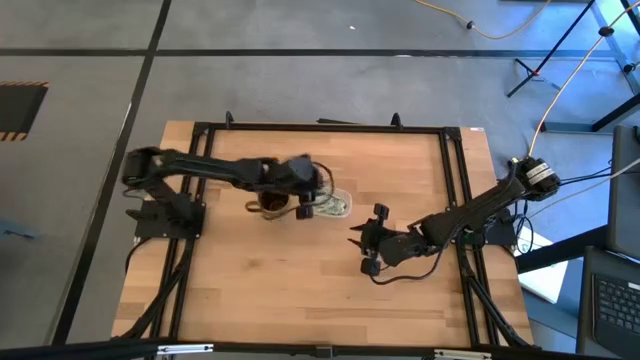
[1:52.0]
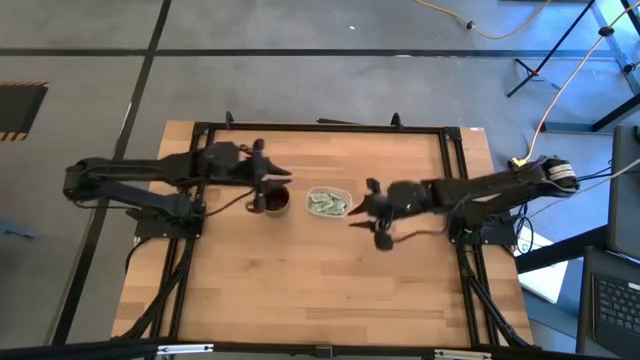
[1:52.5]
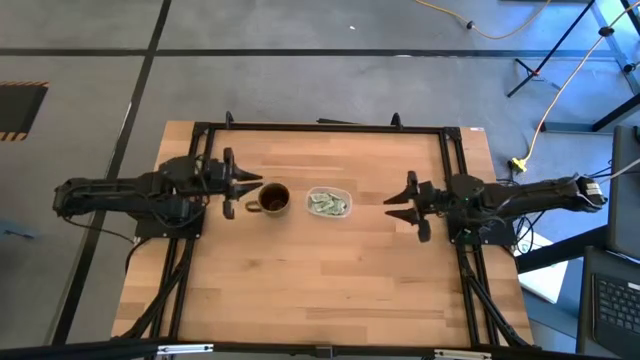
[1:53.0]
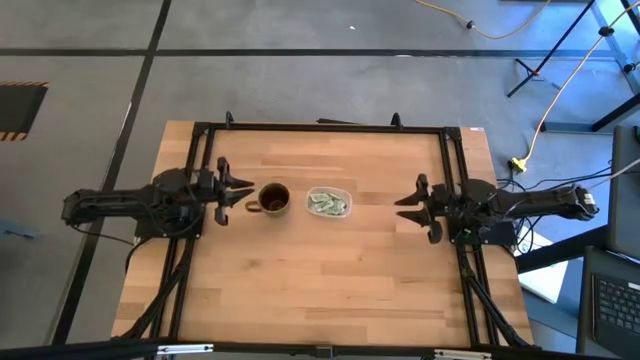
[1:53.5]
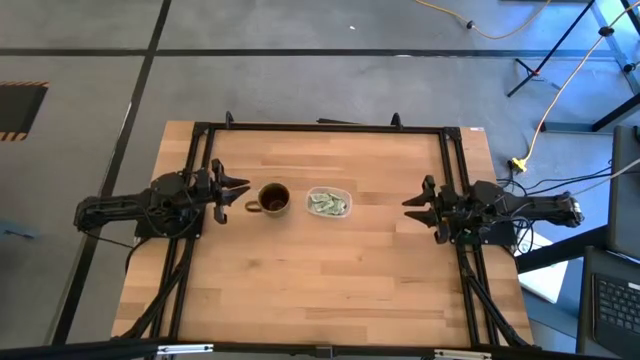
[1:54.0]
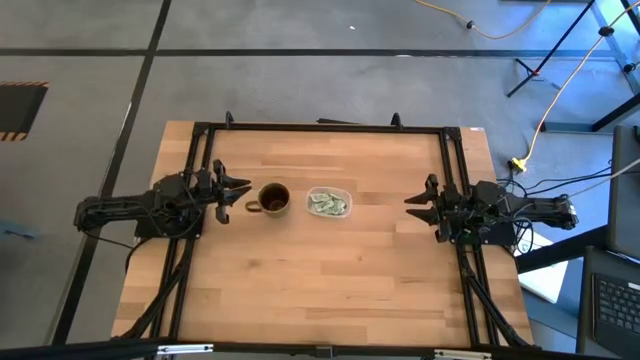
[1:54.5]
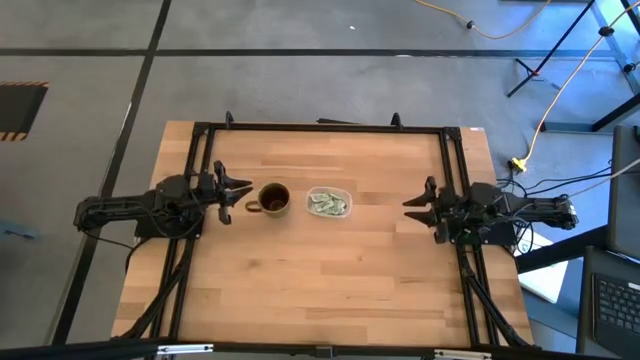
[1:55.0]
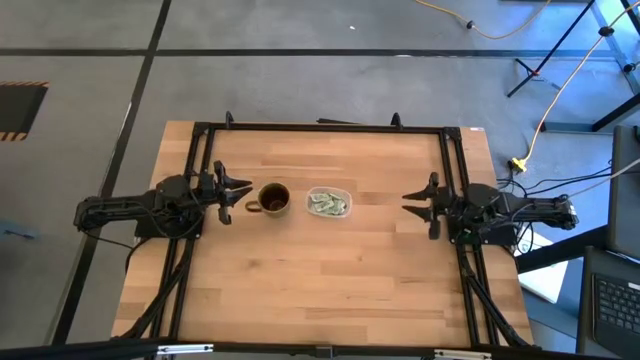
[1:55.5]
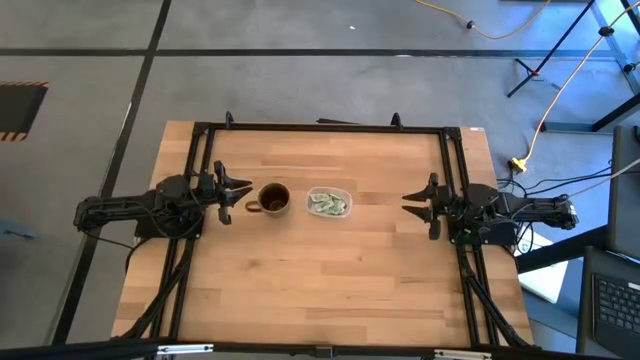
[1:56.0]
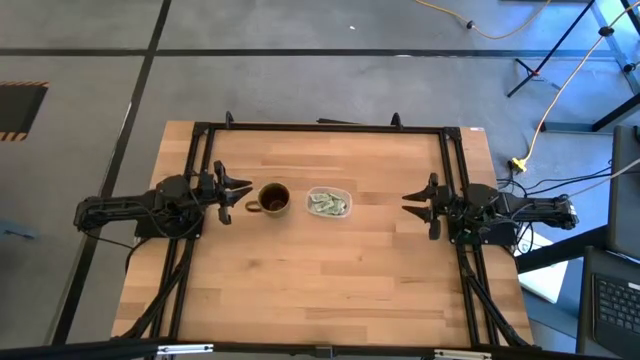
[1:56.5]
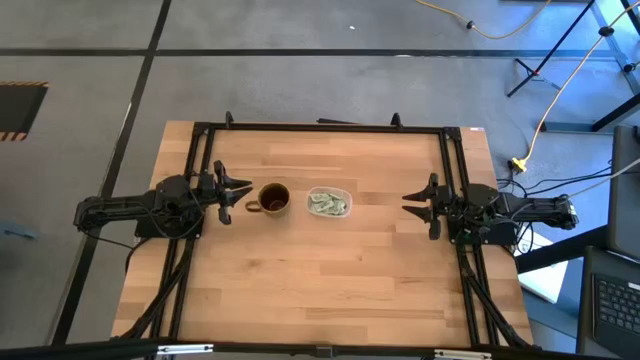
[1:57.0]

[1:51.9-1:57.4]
Task: Pick and place items into bin
Return to Home Position

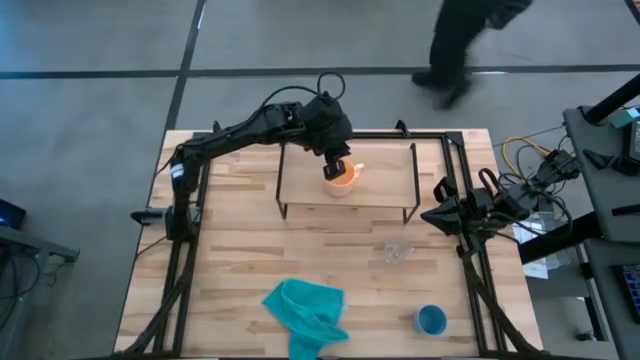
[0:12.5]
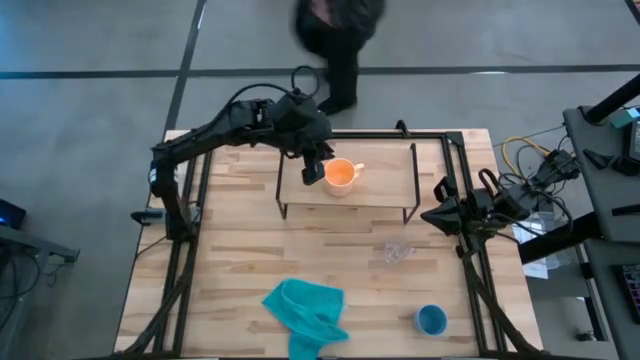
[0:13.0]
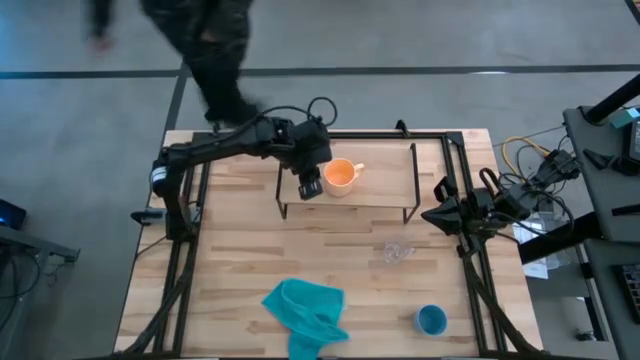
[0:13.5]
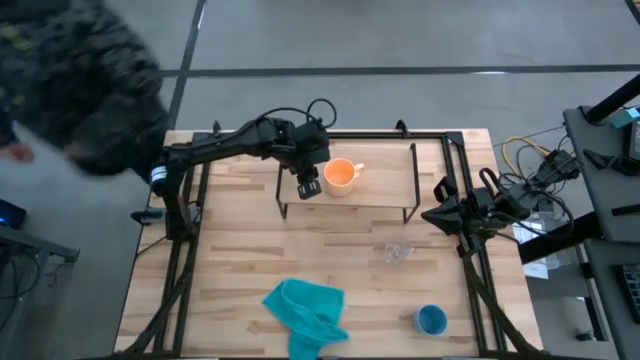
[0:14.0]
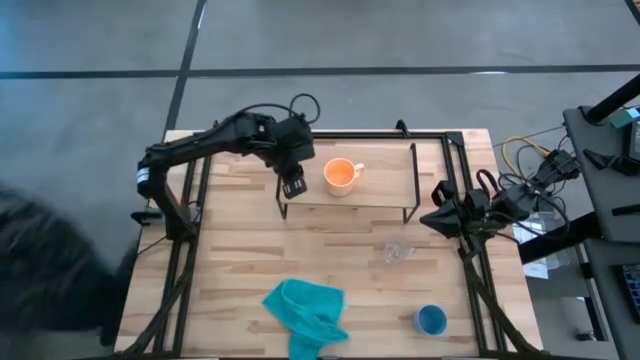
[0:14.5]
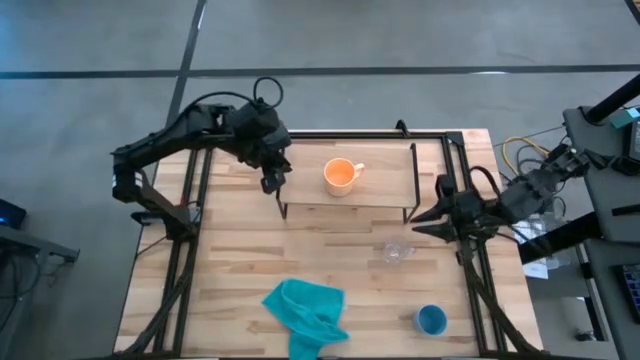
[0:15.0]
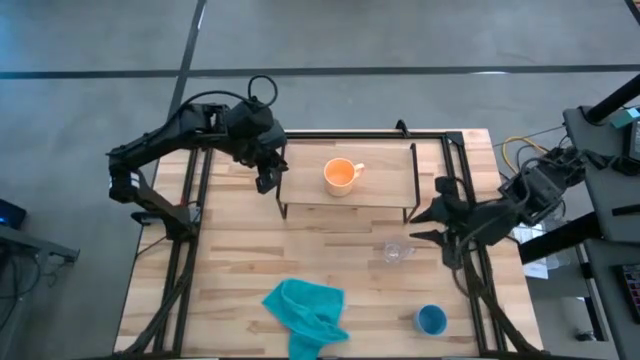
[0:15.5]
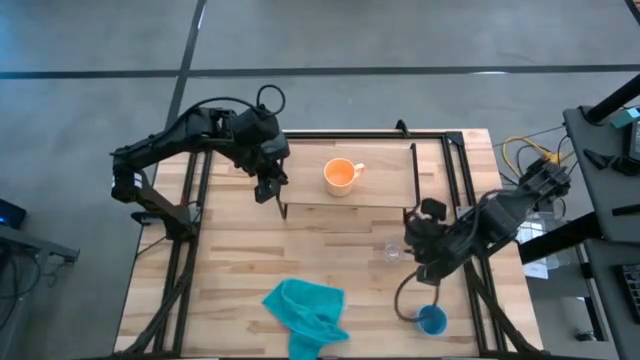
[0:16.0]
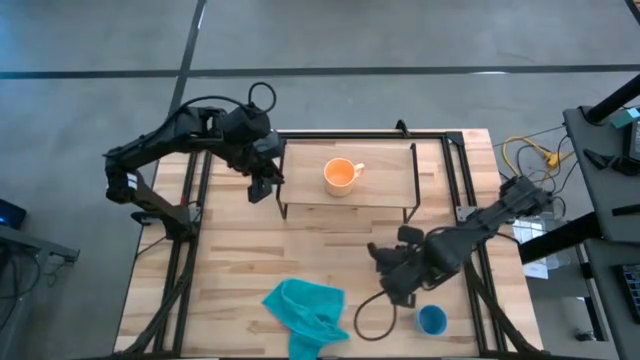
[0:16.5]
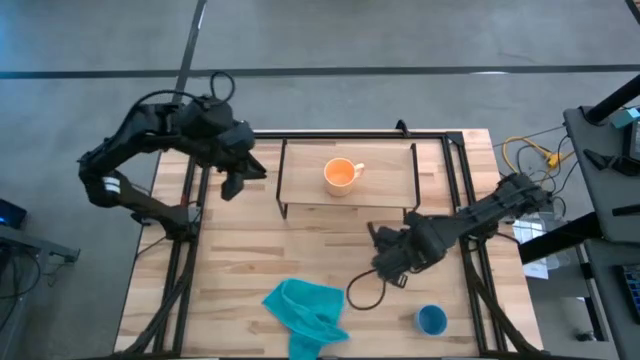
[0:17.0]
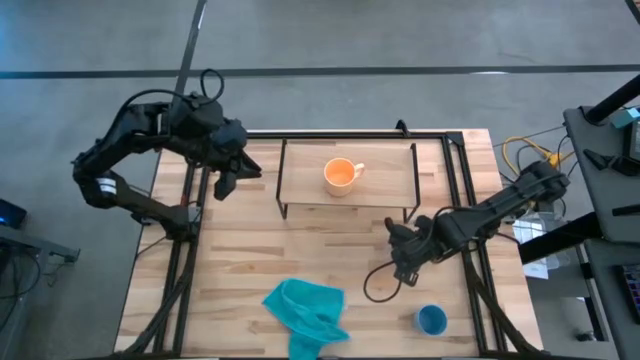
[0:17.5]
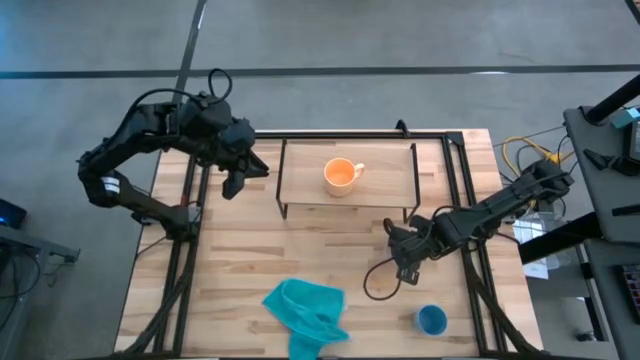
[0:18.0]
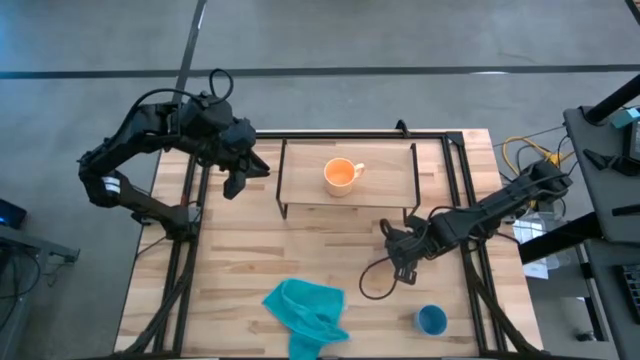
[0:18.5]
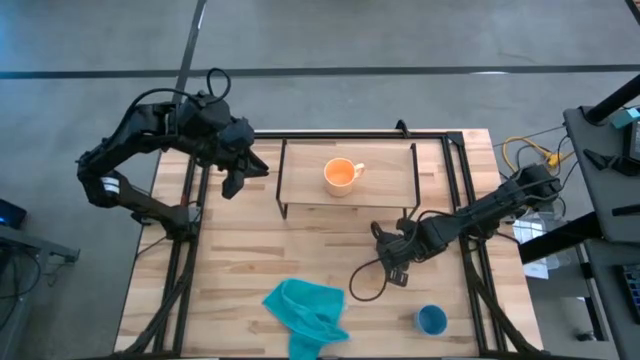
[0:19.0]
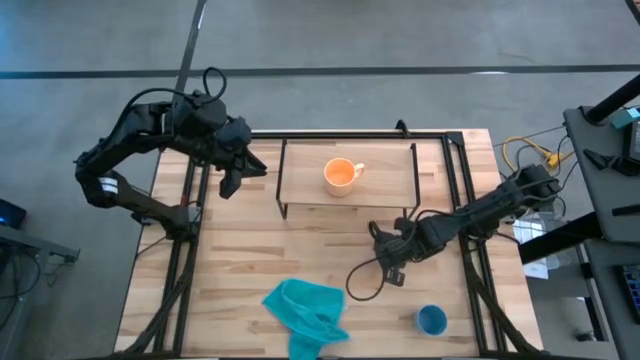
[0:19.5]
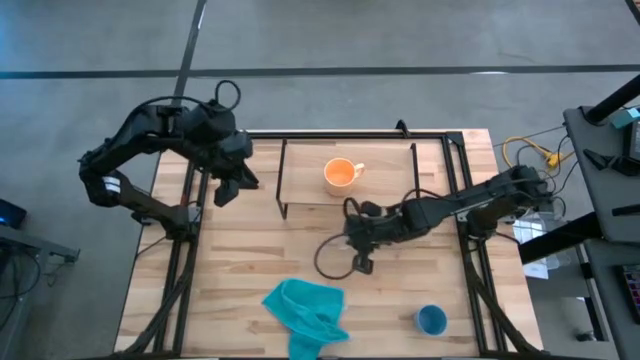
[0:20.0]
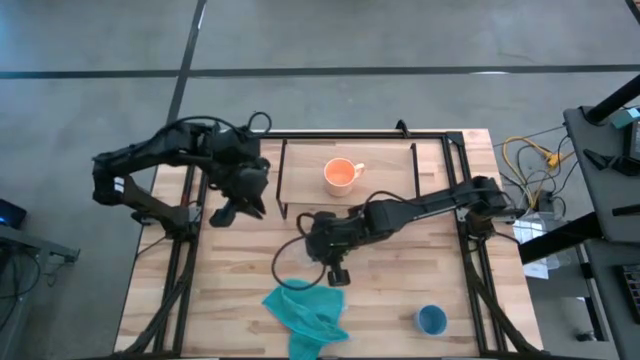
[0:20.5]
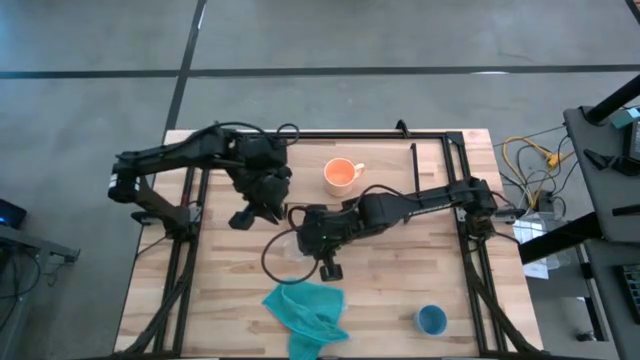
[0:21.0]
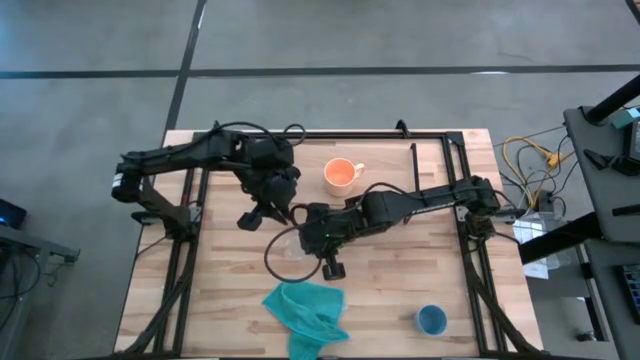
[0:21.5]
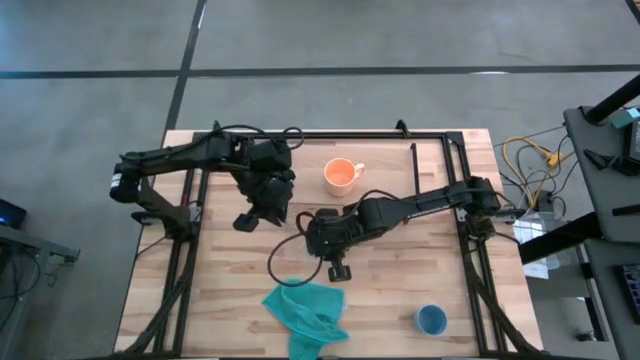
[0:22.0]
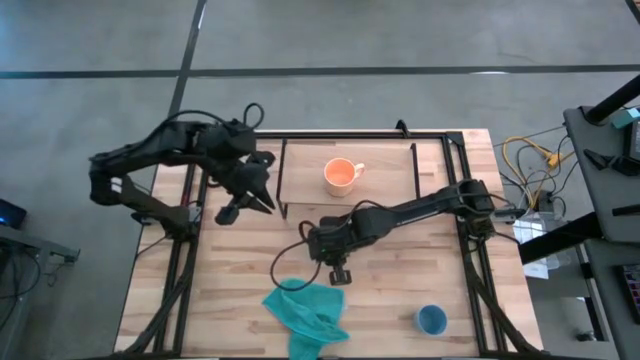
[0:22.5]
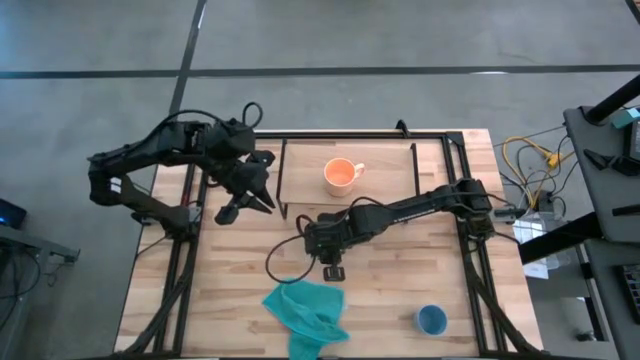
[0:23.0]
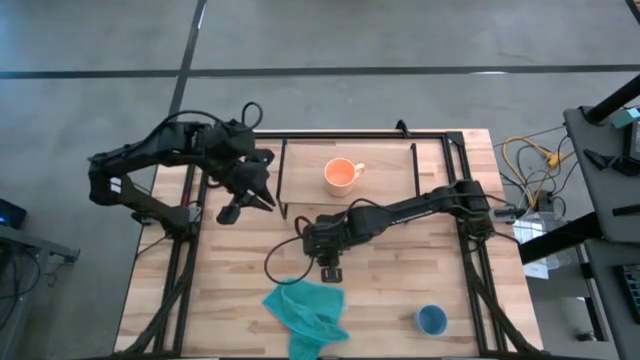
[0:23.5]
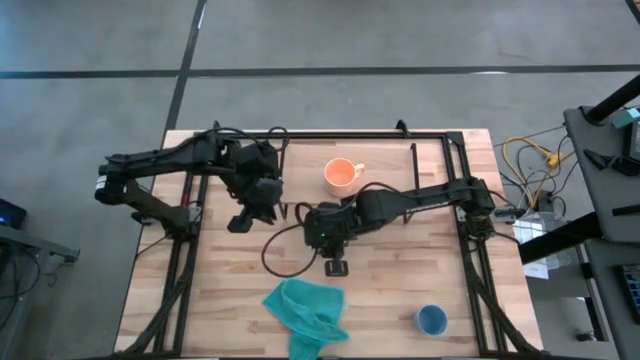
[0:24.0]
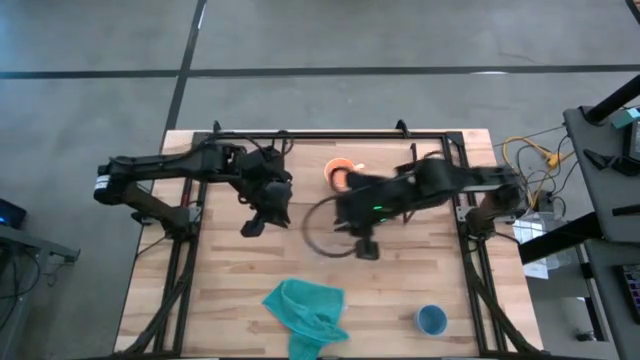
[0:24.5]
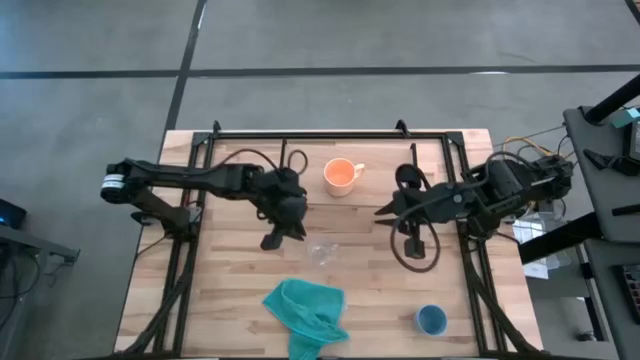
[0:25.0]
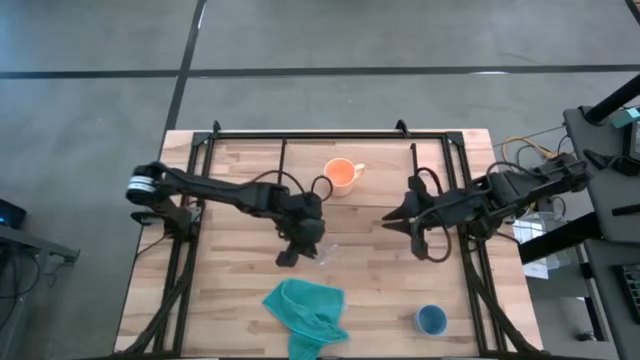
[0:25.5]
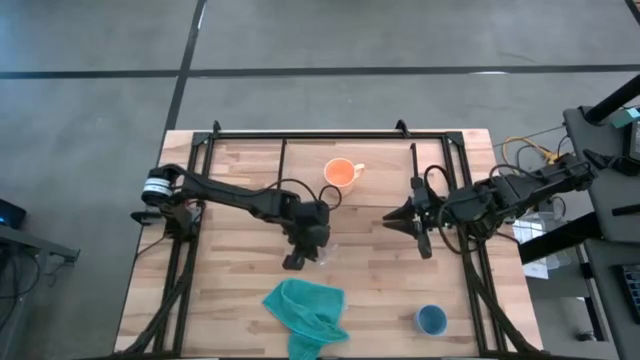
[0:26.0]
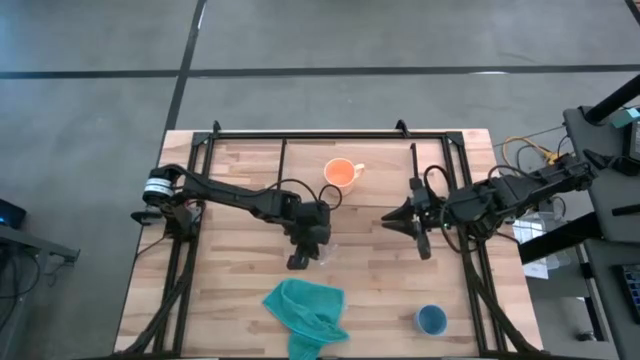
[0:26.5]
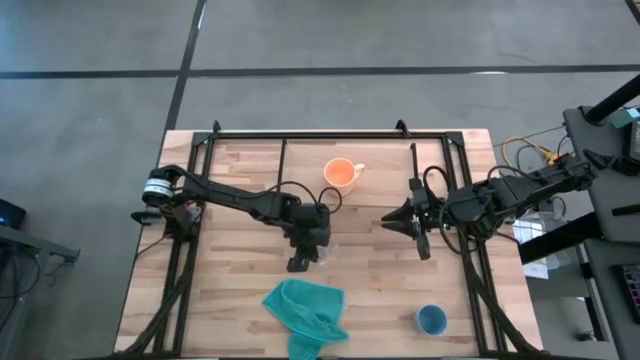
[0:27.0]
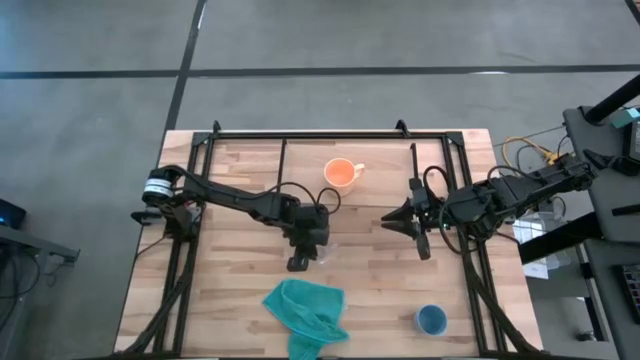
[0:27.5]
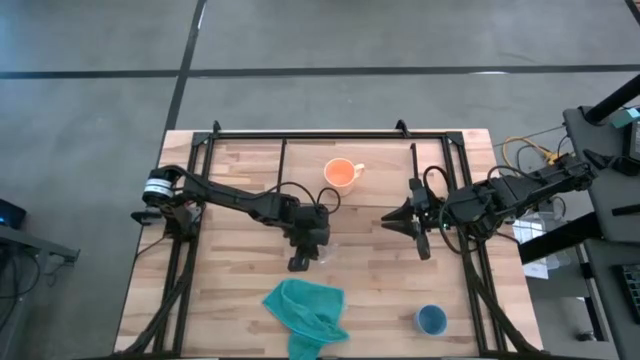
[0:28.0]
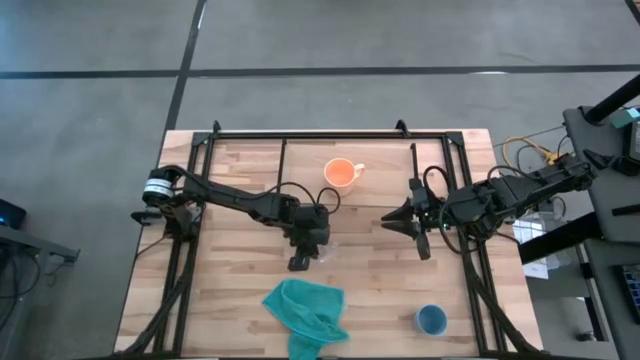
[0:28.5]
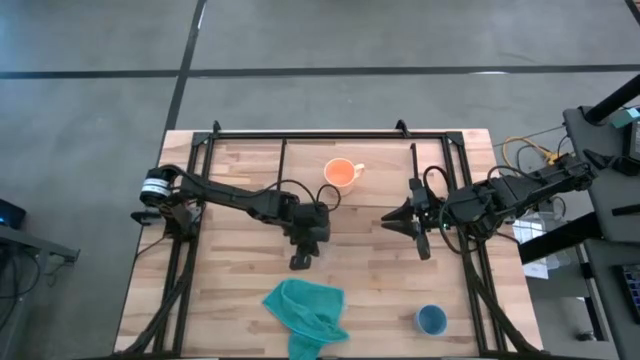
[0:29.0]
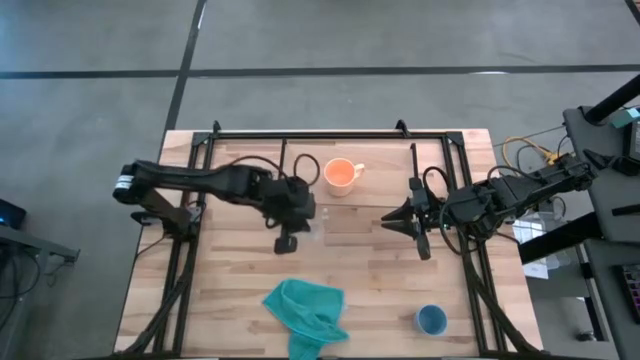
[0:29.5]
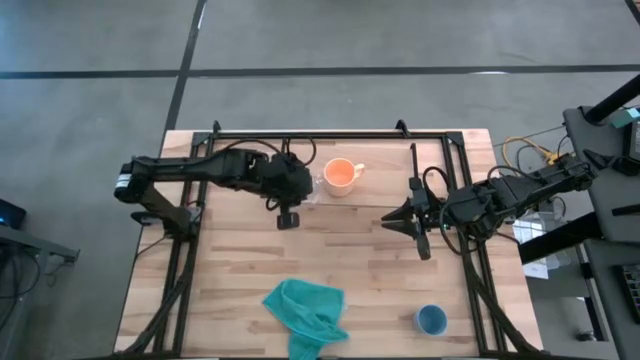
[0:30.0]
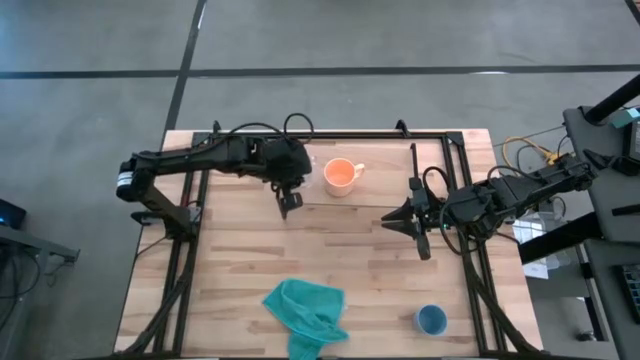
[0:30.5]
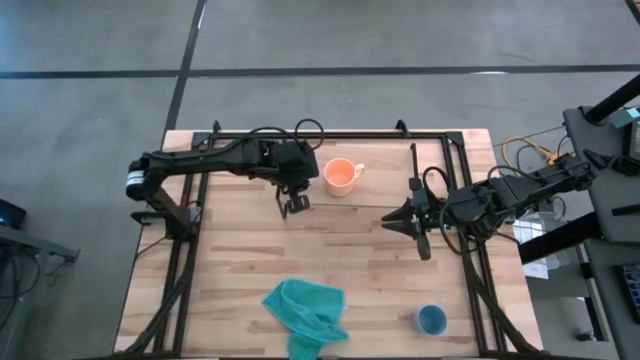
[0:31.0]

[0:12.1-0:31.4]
Task: Stack small to large cups/mugs on shelf
Put the transparent mug on the shelf
